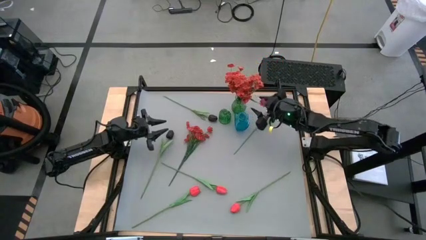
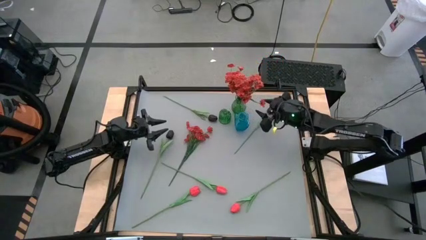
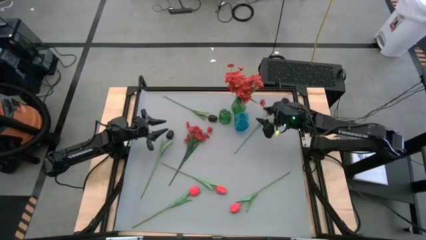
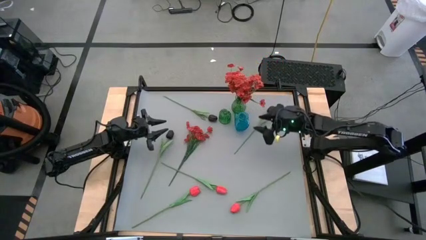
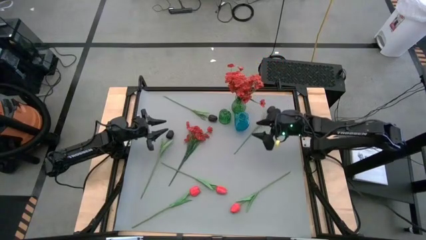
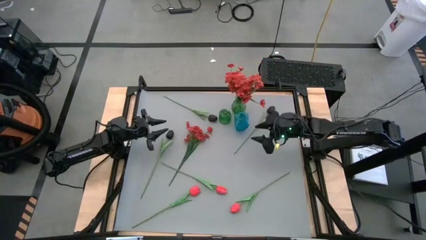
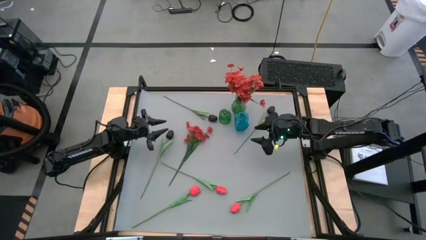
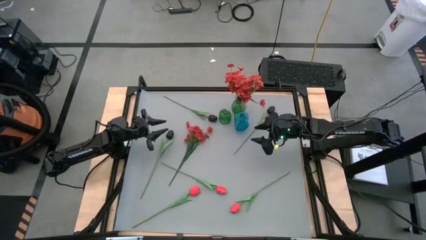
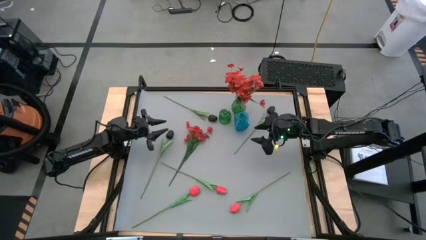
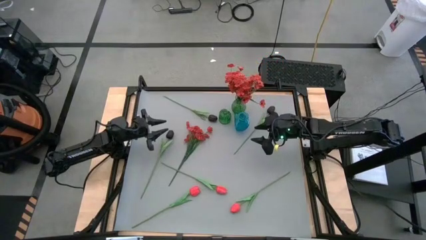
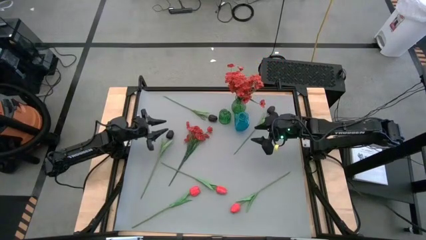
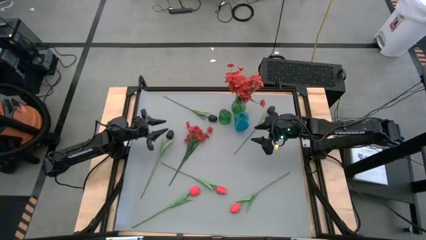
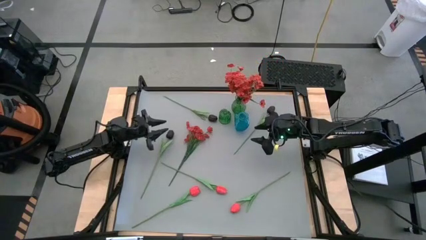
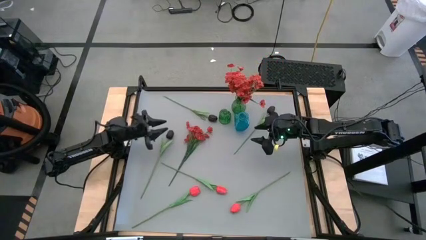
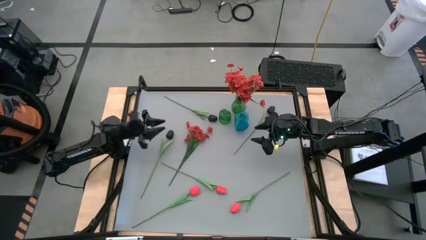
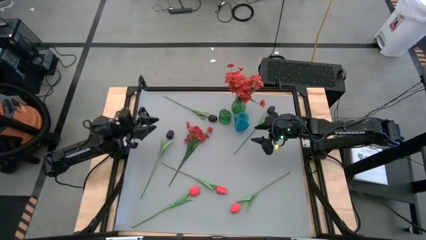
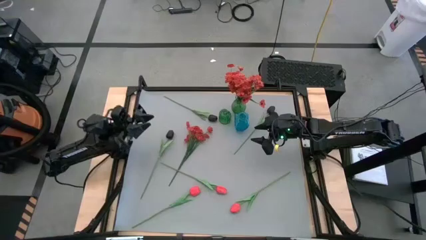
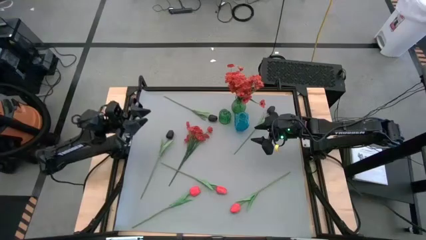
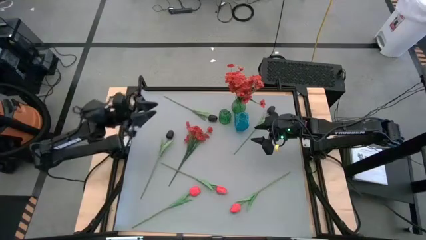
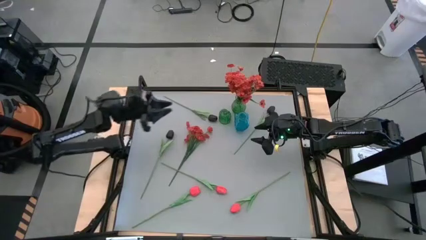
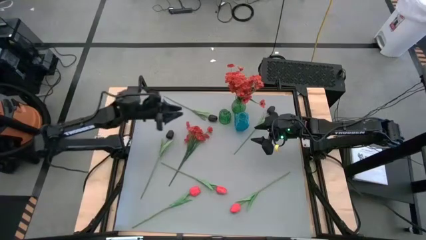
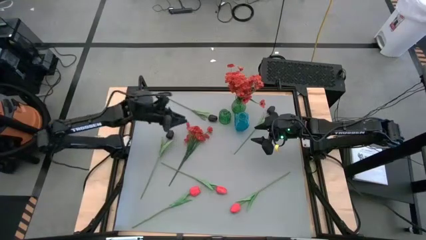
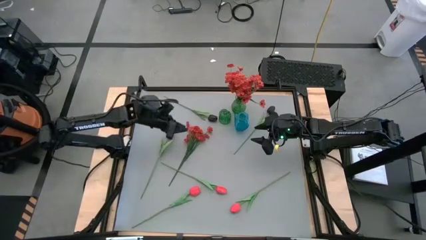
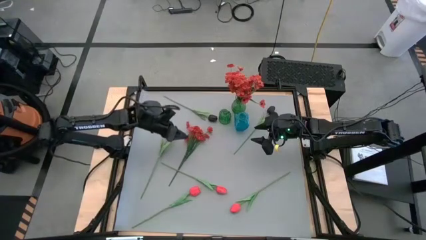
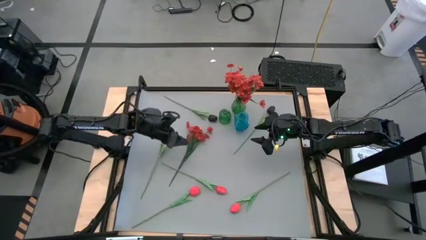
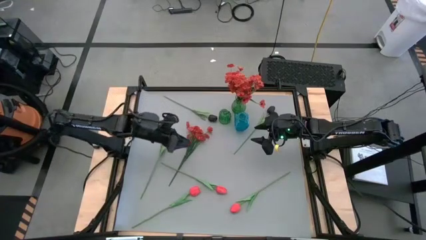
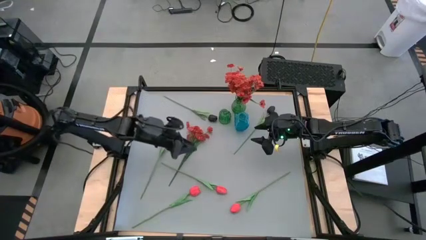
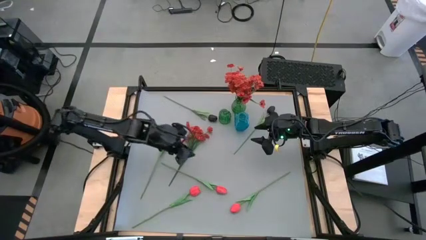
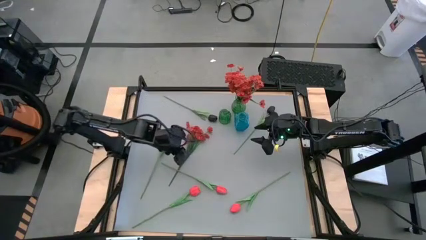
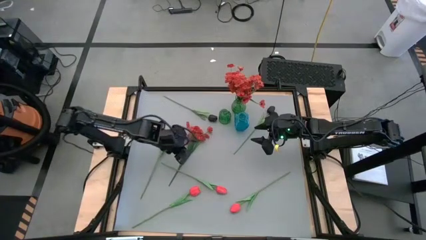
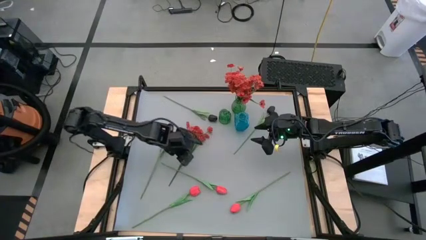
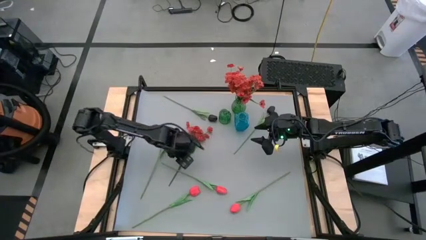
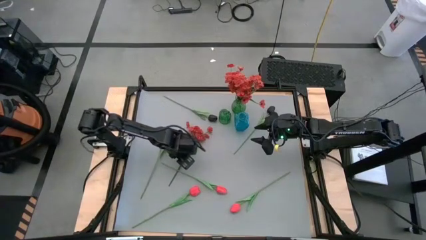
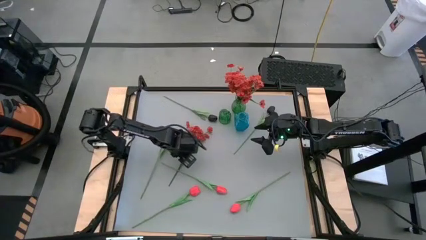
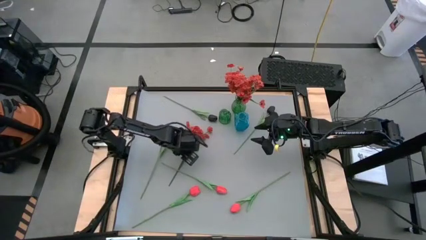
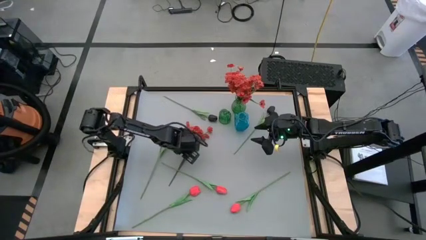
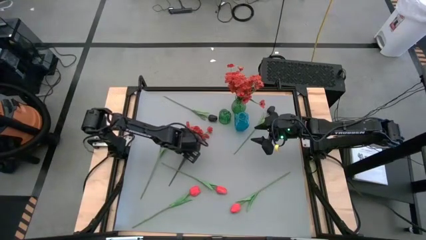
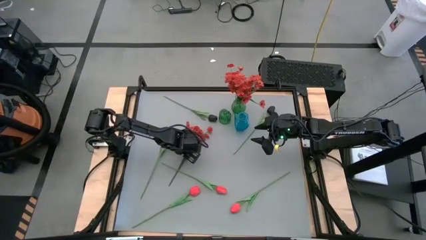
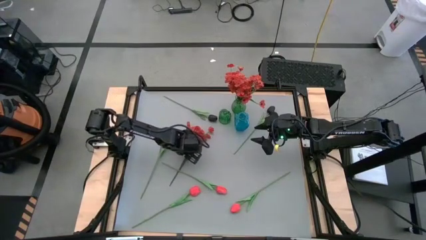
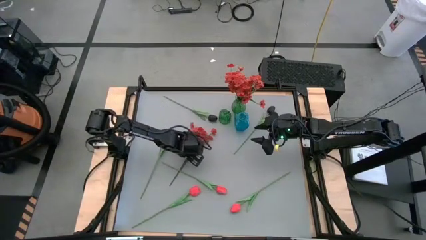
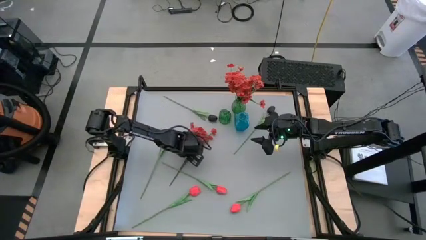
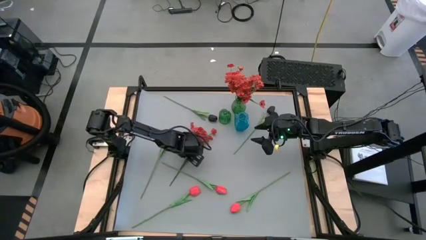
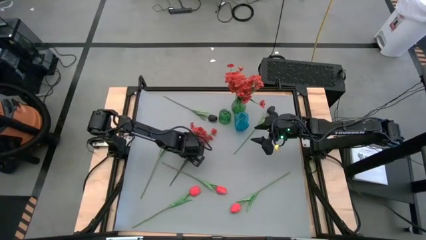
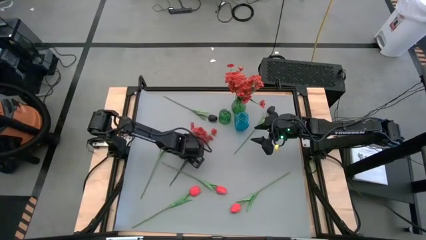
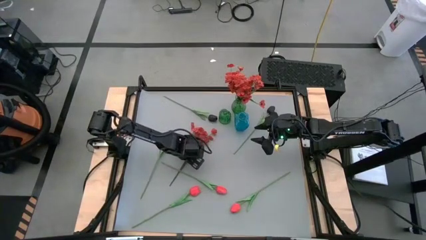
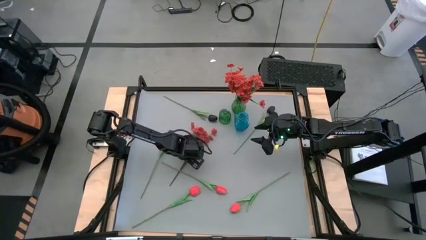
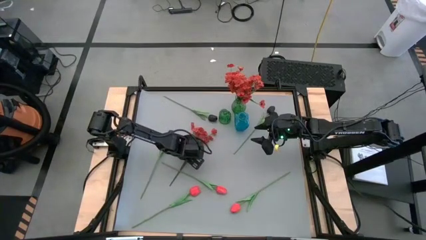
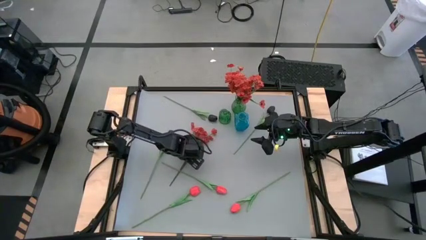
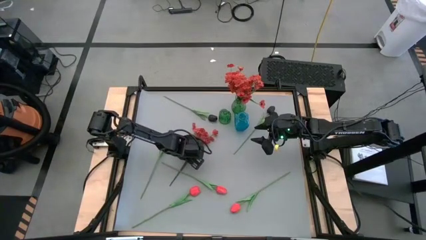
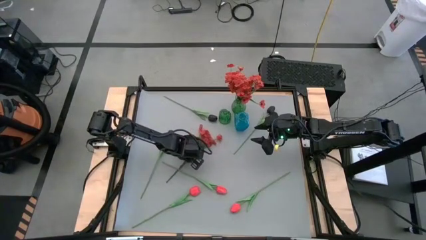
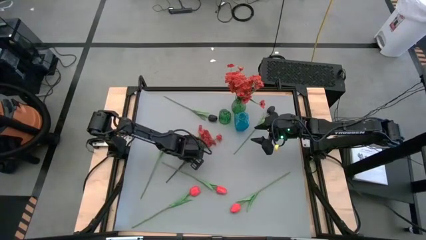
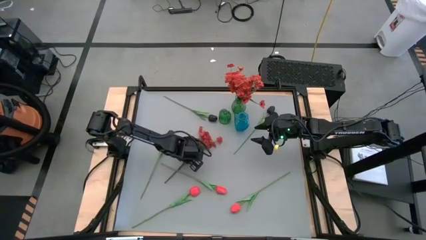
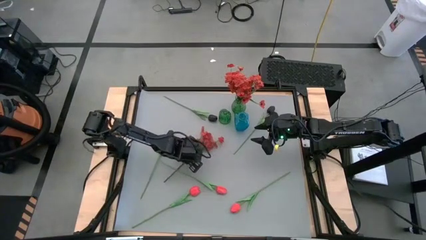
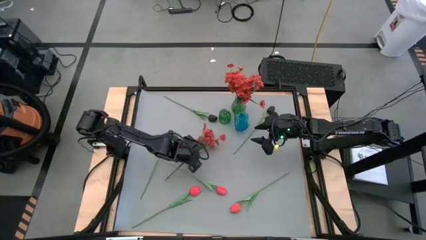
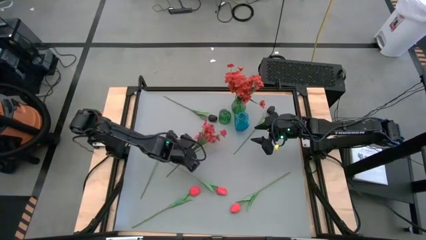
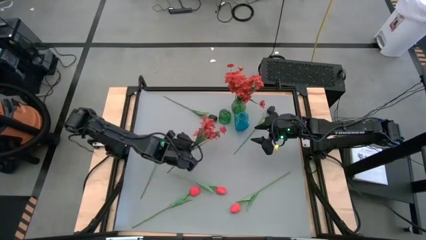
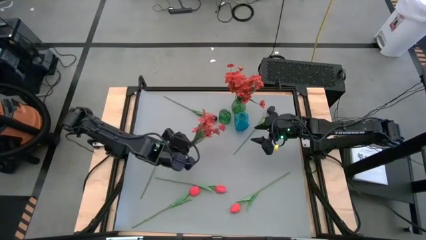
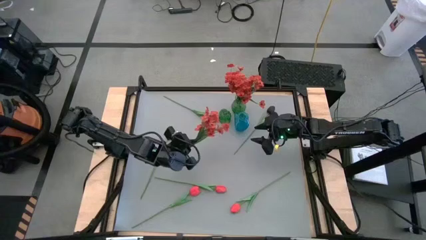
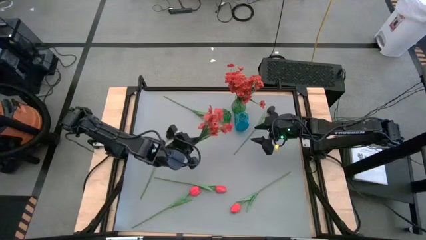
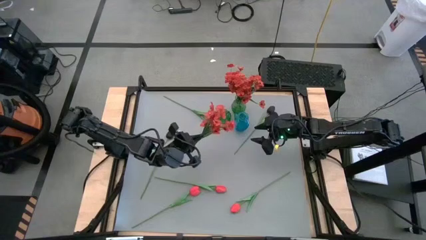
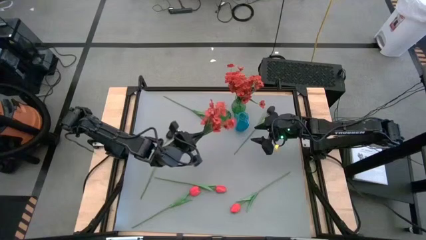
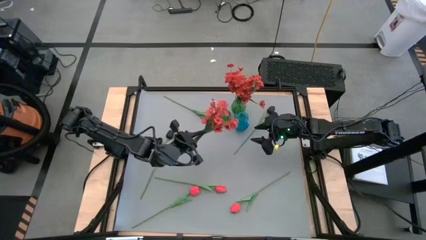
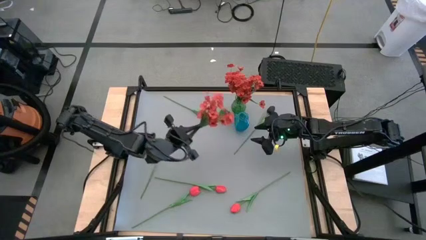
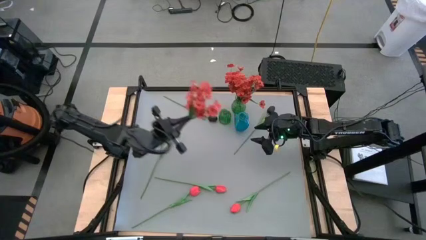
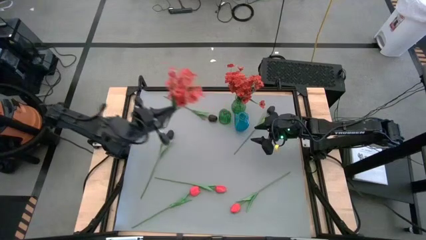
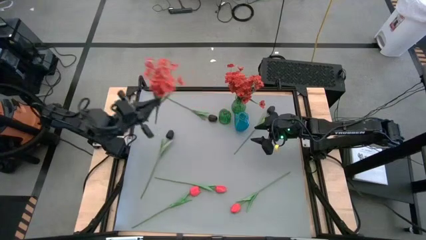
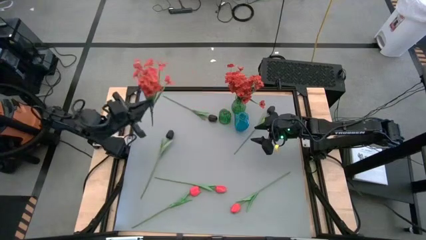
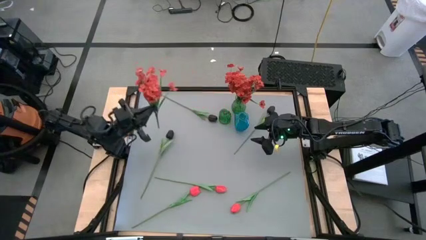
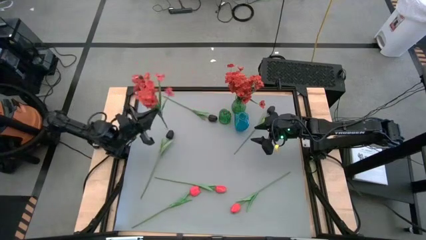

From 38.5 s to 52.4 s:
Task: Sort flowers into vase by color
Put the red flowers into the top green vase

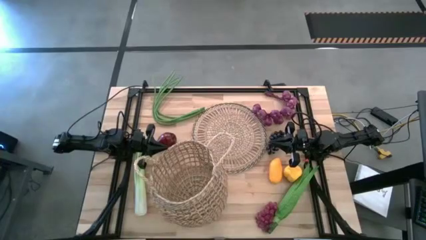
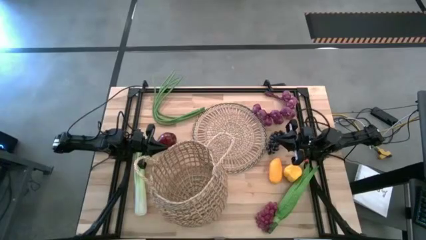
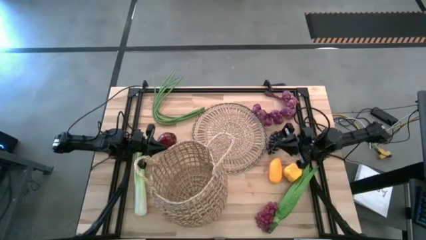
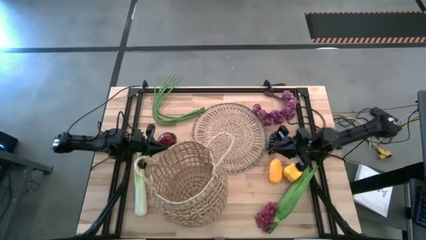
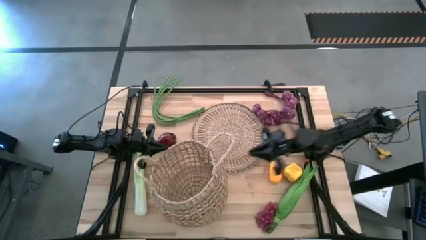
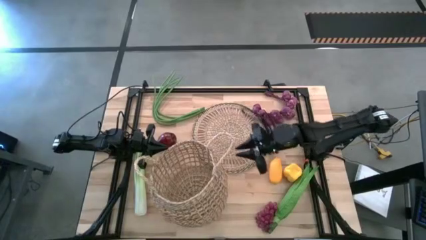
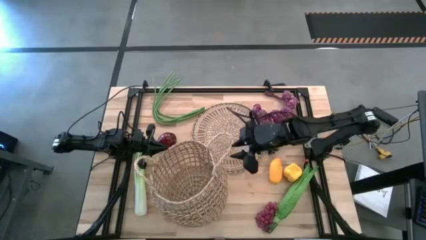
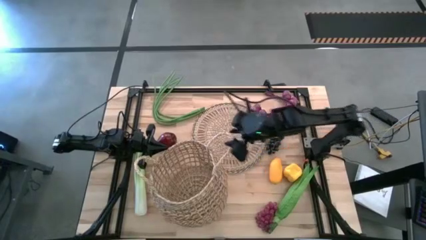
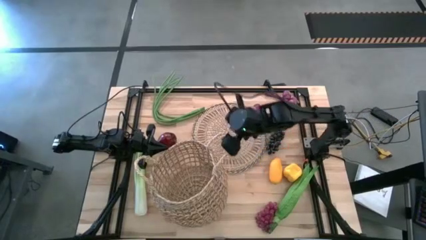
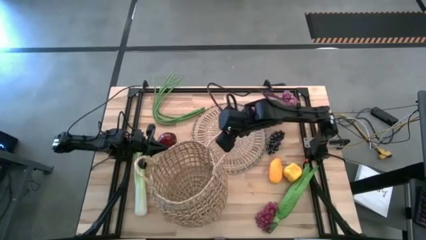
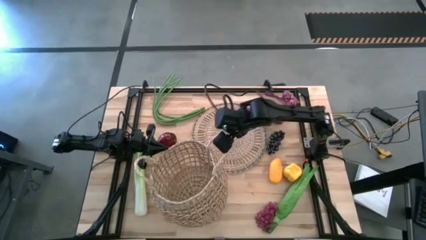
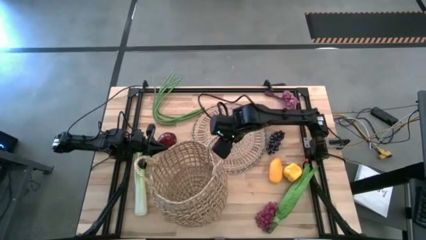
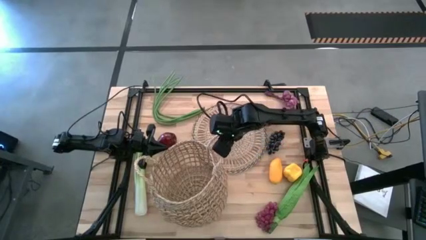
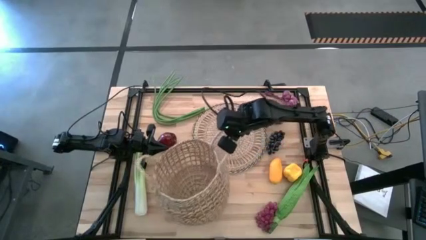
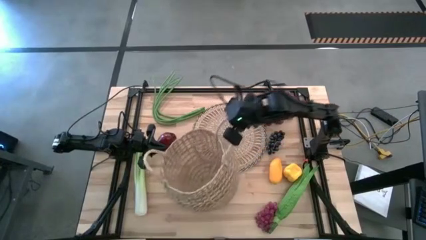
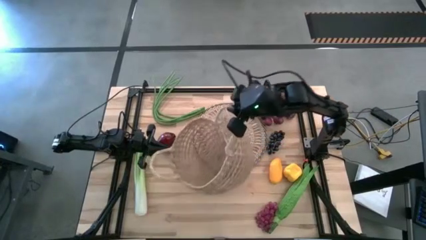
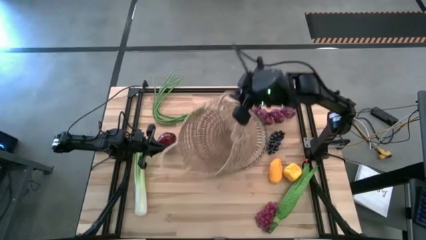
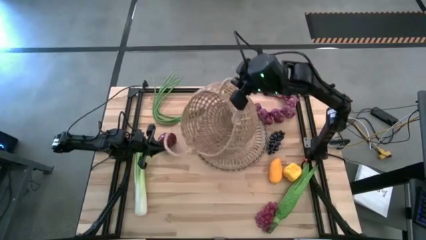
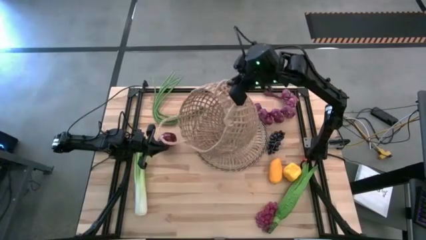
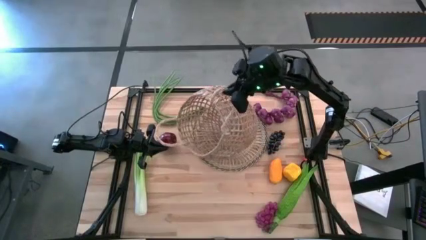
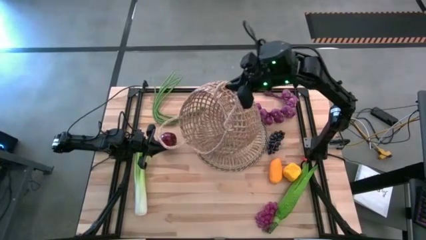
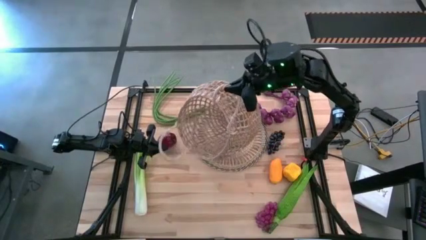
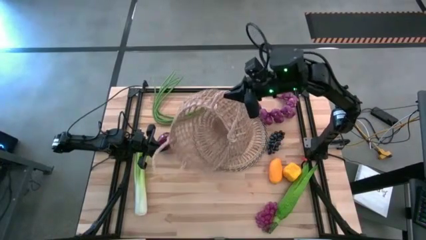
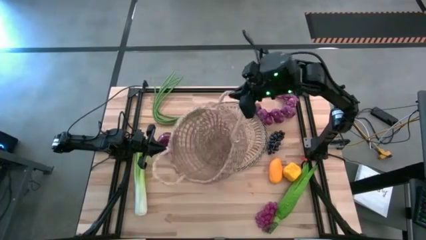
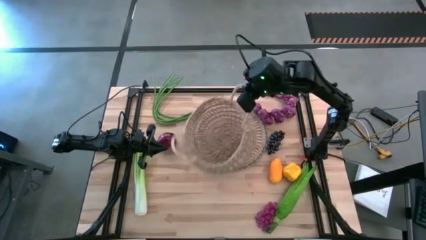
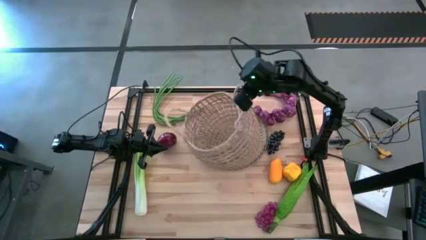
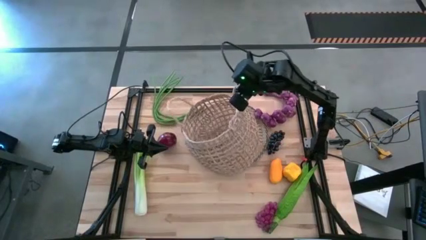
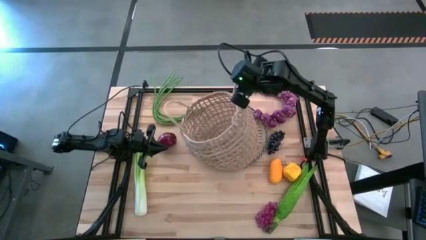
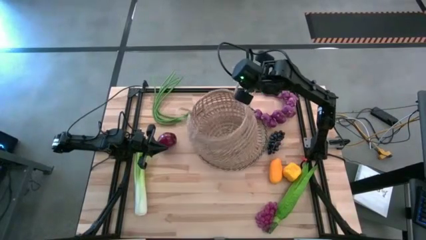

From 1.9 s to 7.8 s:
Task: Build produce basket
Put the basket onto the table mat in the middle of the table
